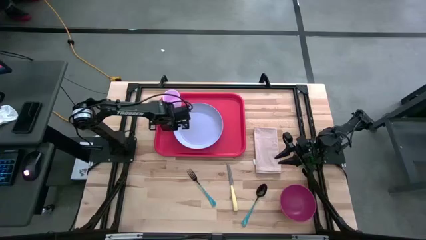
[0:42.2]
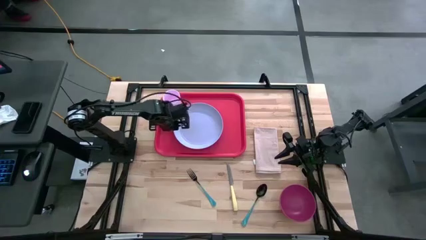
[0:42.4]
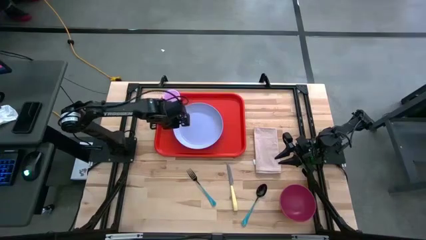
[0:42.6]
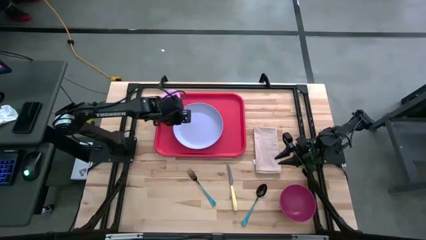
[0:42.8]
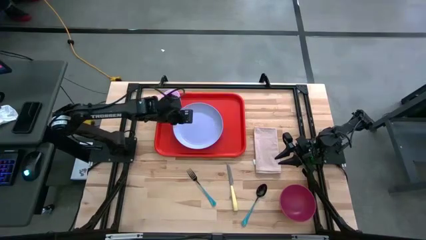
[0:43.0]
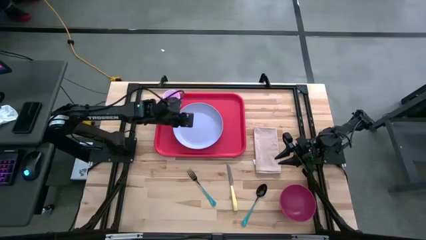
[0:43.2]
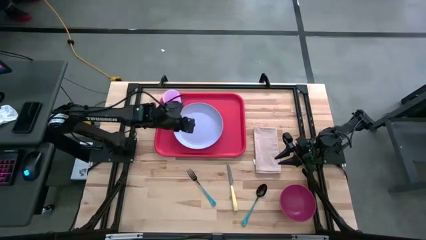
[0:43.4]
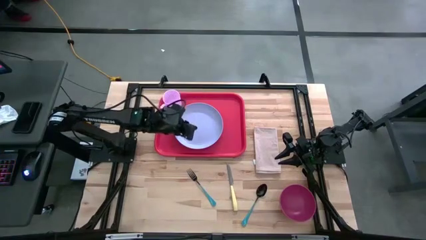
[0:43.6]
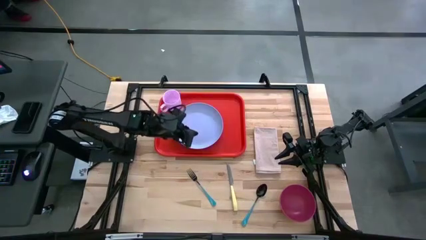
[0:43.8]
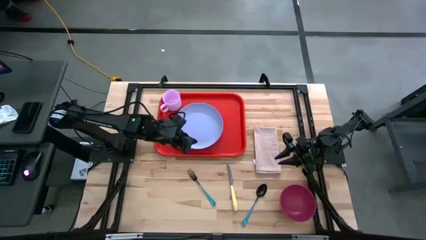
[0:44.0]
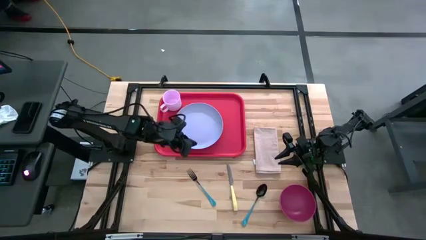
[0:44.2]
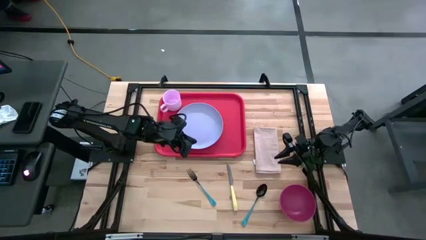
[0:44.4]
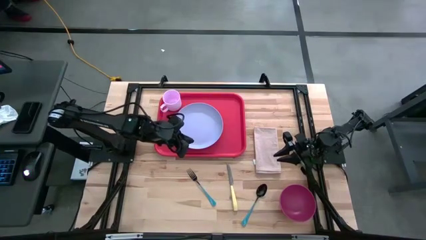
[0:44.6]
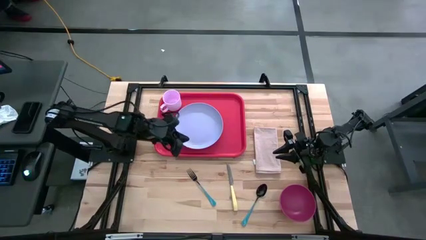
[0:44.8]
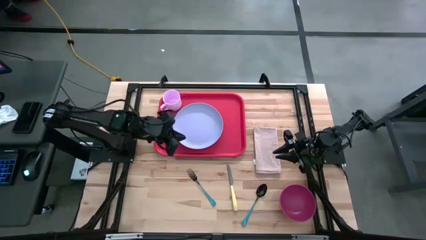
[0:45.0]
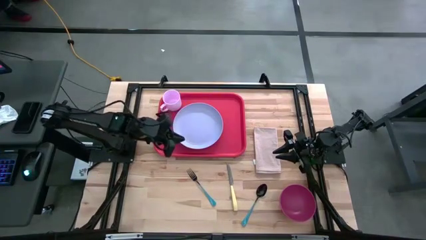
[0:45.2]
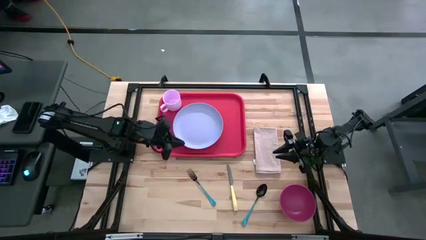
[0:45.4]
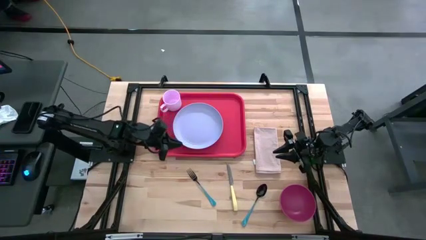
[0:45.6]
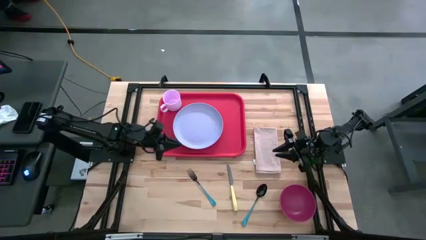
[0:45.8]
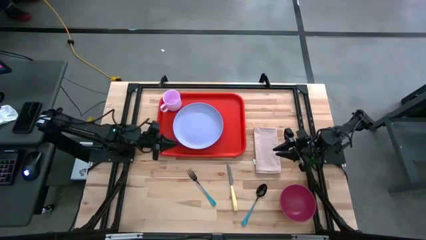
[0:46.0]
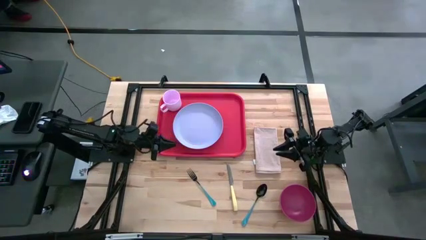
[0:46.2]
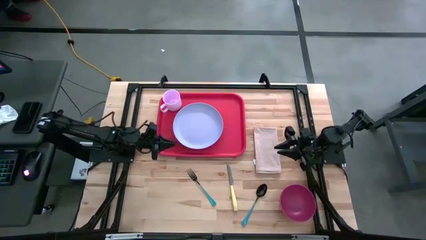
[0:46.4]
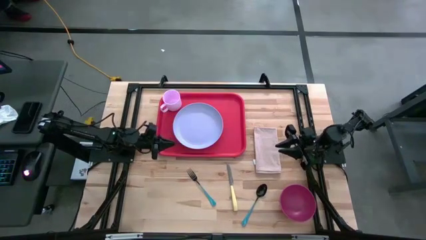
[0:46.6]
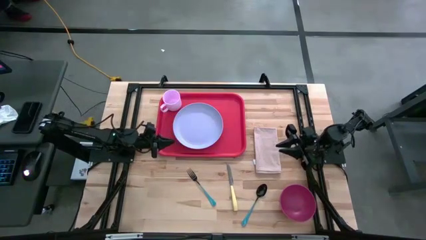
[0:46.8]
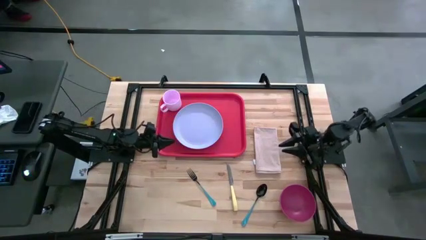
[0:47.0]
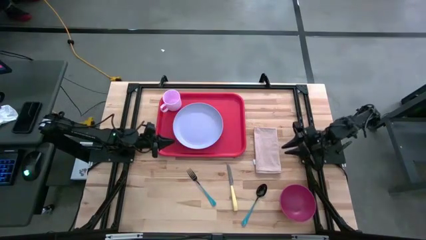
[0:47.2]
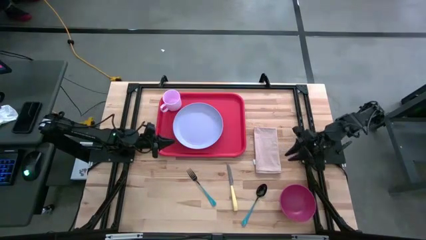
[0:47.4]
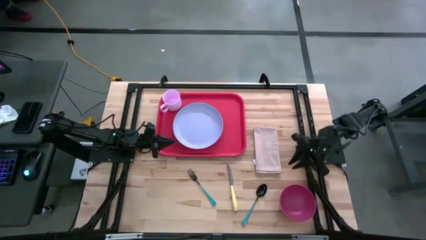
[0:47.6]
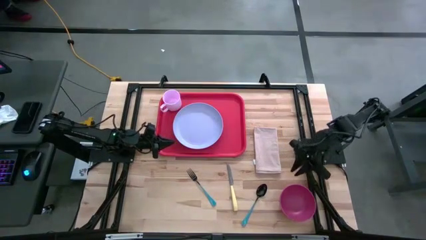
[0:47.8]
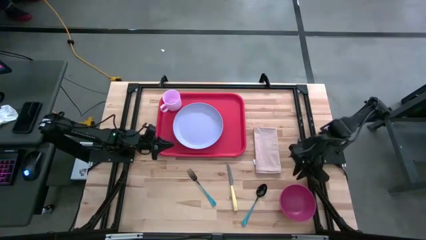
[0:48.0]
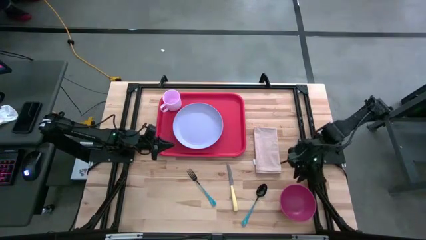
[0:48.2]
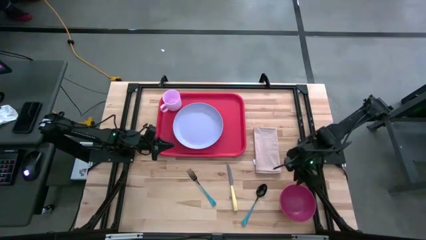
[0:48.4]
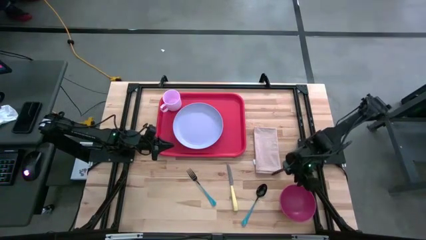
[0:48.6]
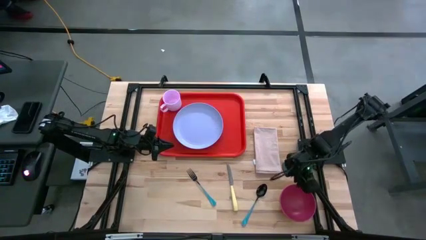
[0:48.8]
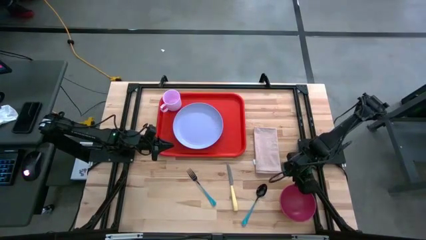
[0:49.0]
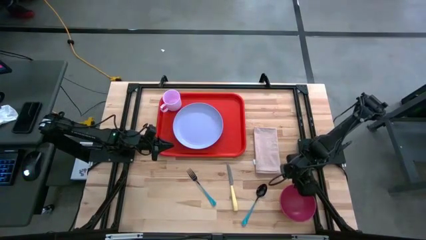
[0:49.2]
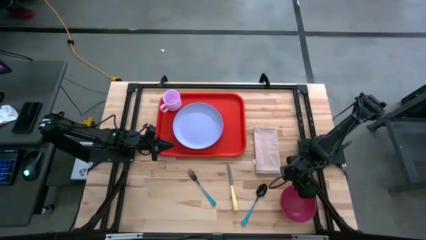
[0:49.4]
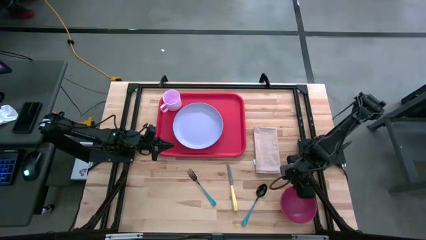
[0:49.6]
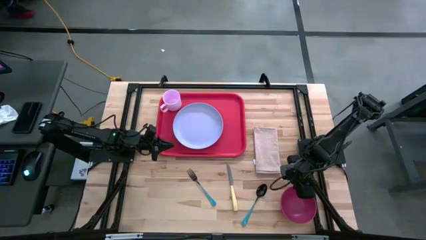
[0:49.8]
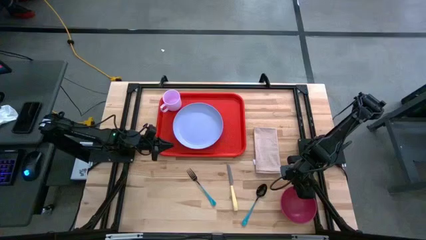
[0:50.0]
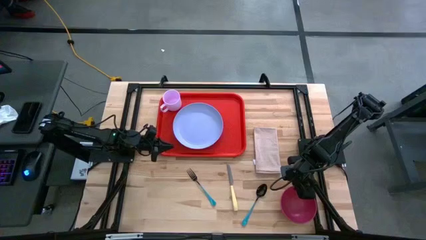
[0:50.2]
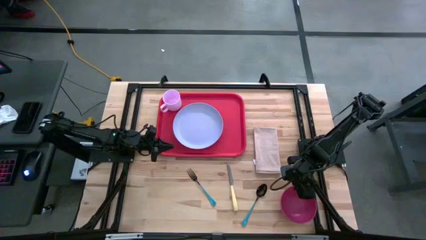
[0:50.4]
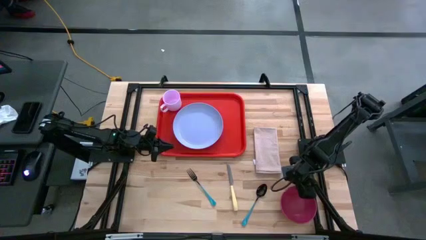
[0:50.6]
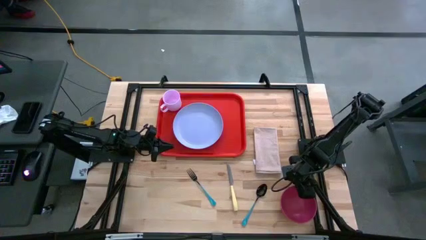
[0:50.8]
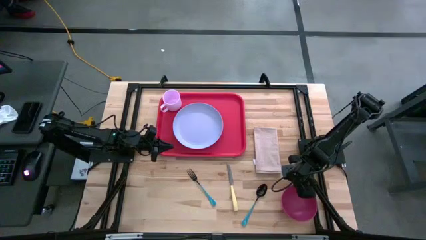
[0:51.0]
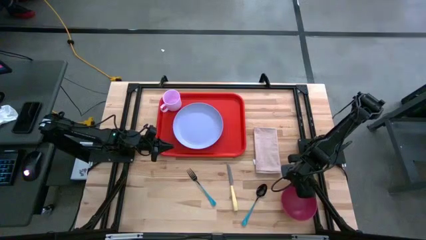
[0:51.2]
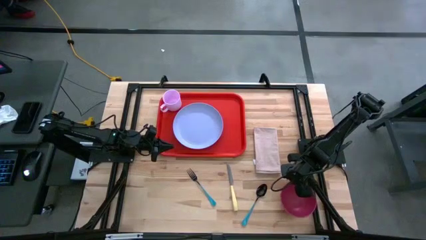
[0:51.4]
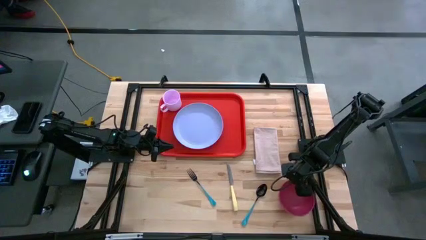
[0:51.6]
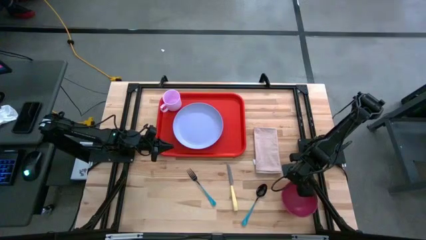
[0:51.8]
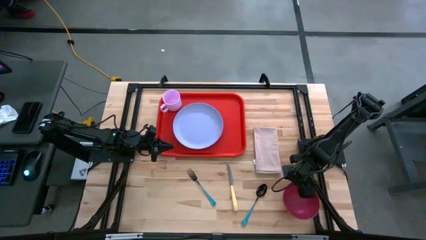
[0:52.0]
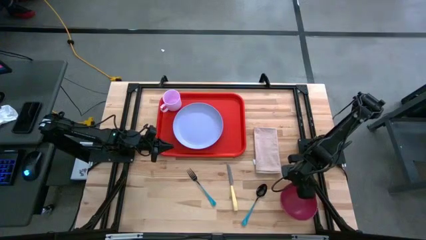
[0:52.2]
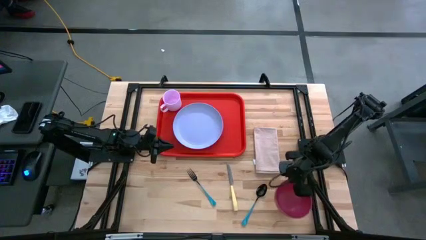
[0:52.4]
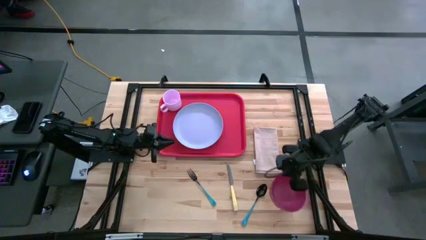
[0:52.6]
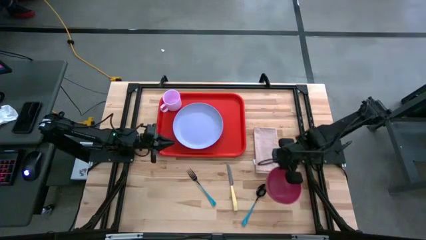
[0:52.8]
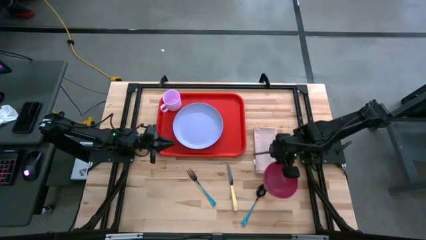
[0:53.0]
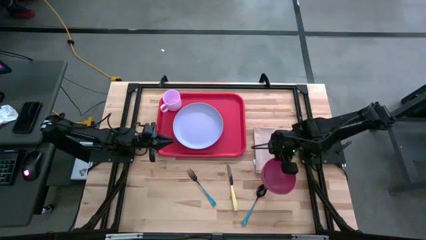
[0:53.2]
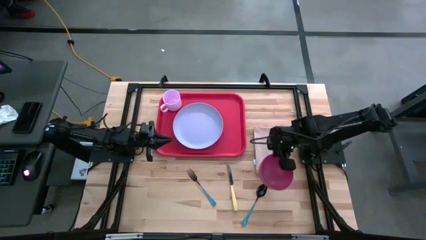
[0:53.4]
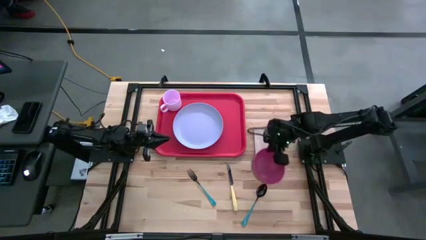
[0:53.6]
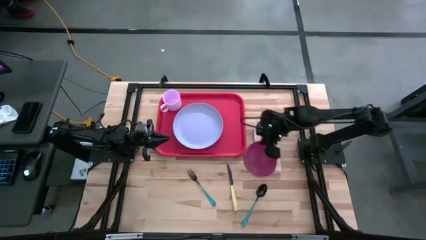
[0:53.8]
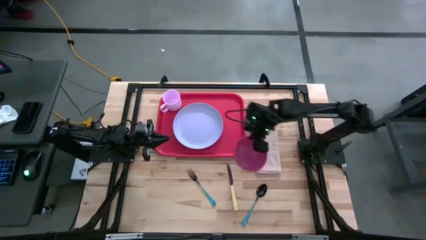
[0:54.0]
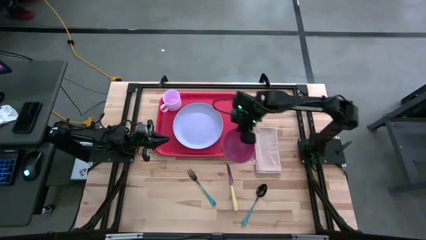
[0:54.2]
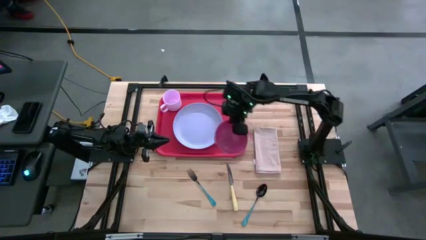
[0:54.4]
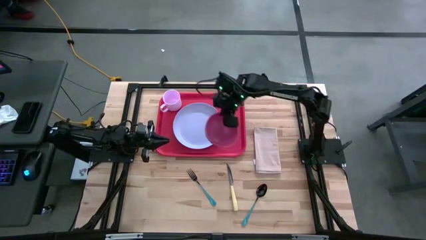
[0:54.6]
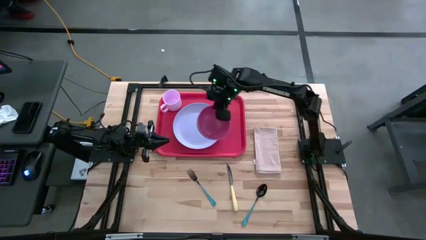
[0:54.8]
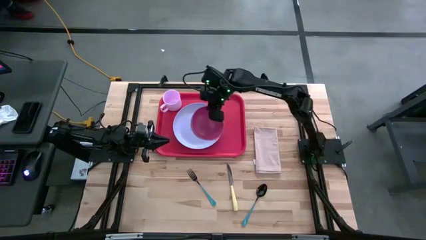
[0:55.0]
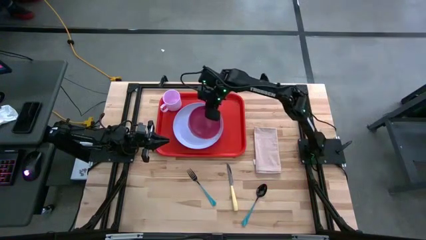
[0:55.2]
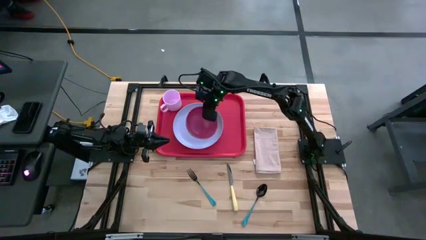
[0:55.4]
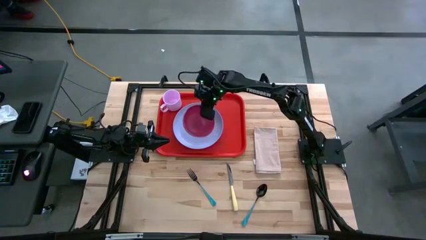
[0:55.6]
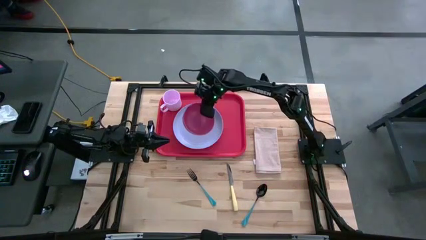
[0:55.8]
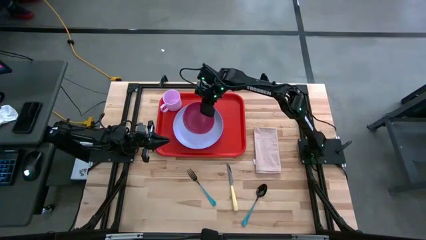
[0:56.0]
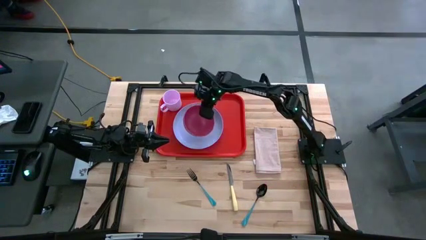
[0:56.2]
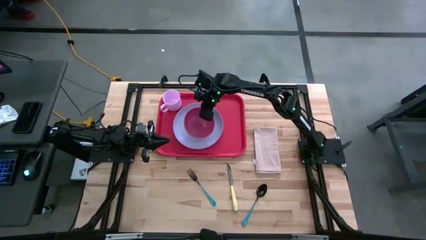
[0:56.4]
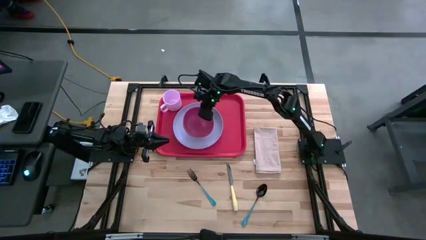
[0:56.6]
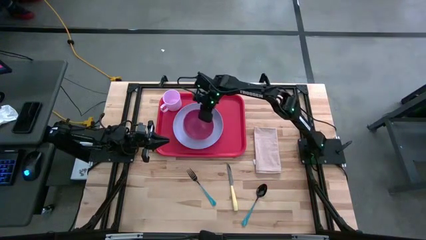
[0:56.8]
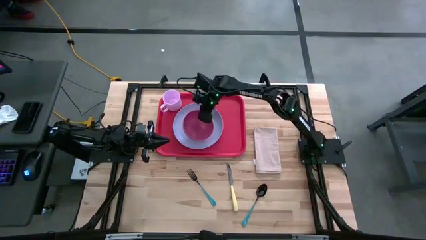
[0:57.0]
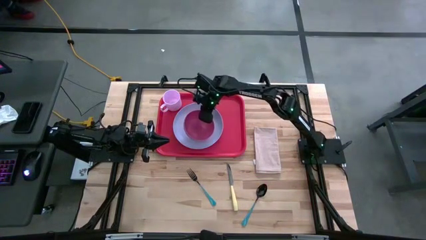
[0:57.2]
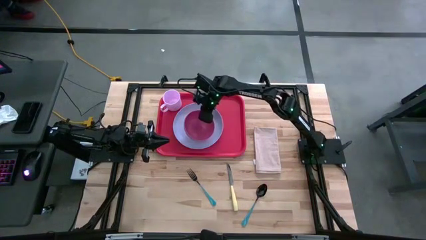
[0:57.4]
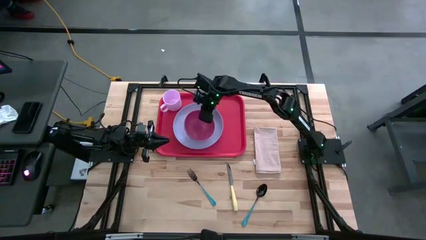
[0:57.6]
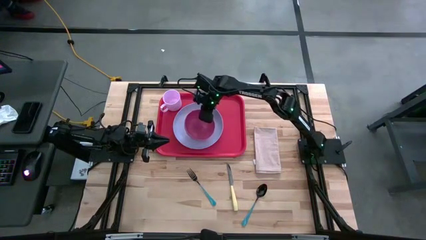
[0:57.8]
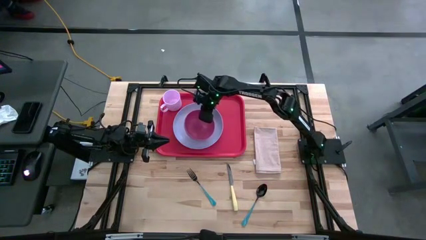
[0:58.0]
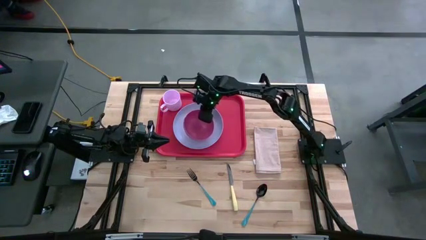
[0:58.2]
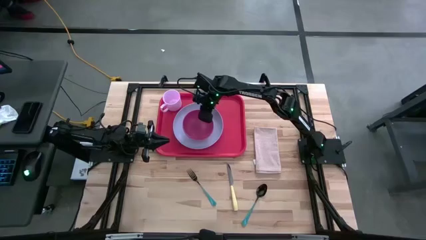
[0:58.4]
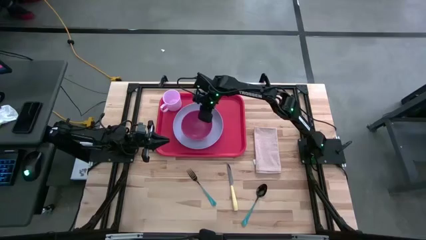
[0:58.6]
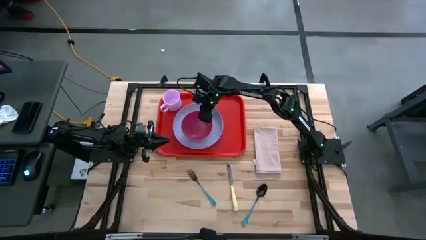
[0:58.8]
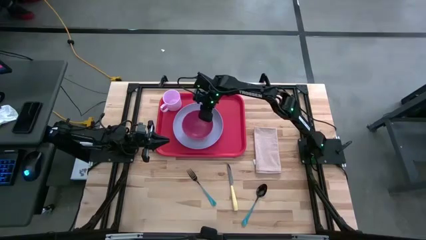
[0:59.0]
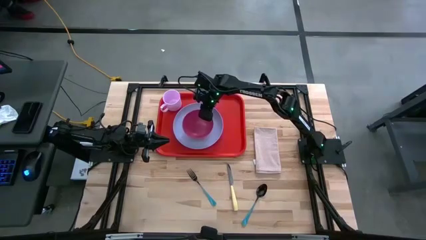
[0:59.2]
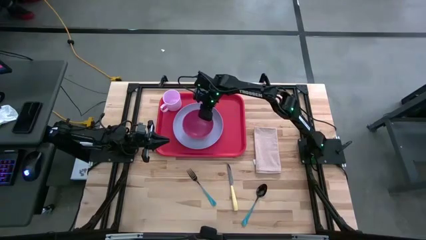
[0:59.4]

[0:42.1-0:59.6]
Task: Set up tray
Put the pink bowl on the purple plate to the bottom right of the pink mug
